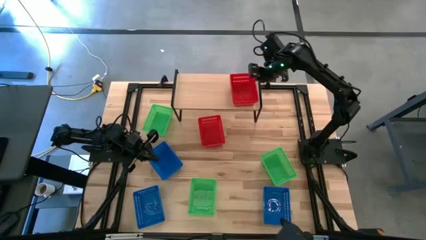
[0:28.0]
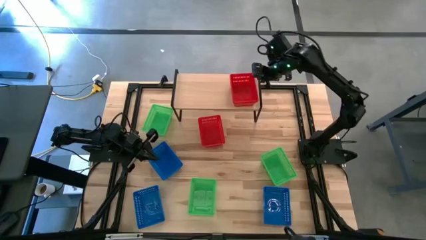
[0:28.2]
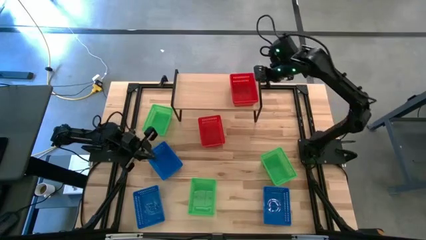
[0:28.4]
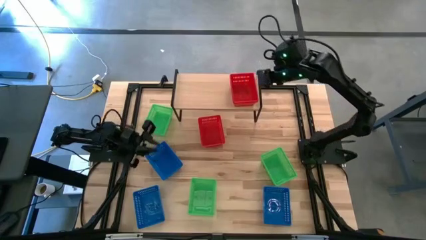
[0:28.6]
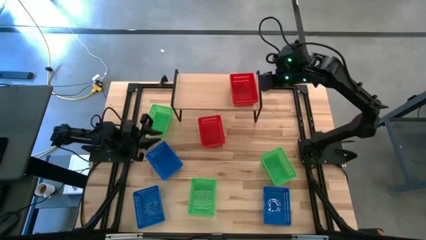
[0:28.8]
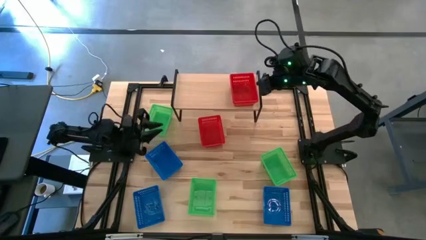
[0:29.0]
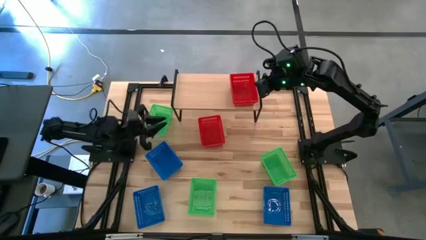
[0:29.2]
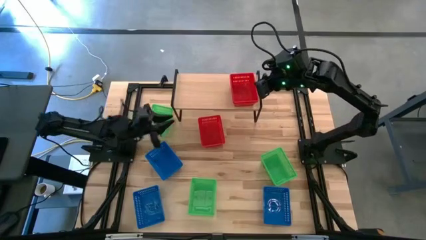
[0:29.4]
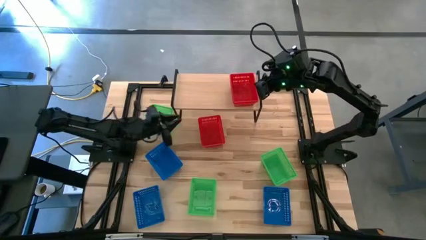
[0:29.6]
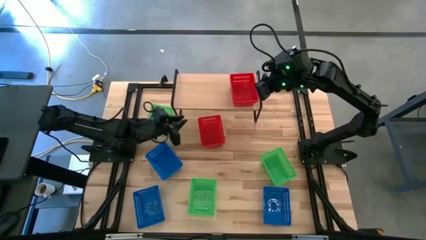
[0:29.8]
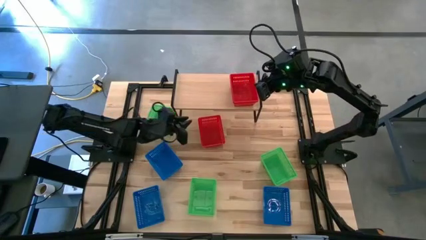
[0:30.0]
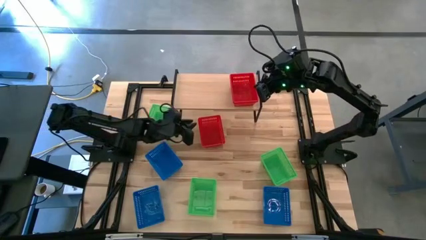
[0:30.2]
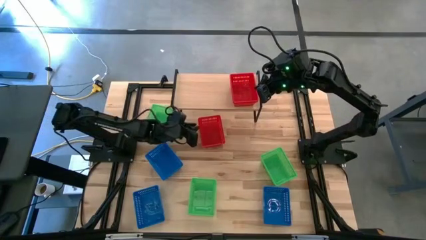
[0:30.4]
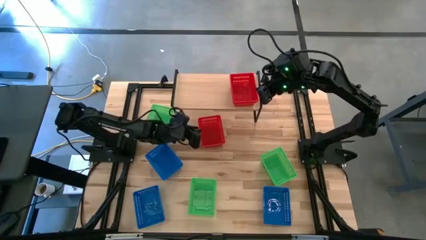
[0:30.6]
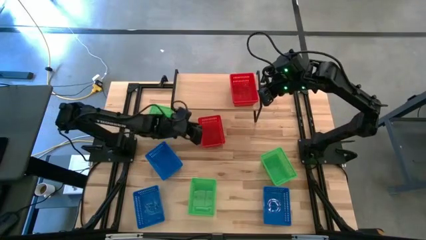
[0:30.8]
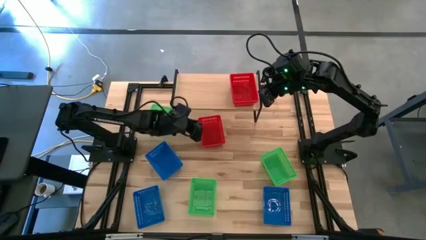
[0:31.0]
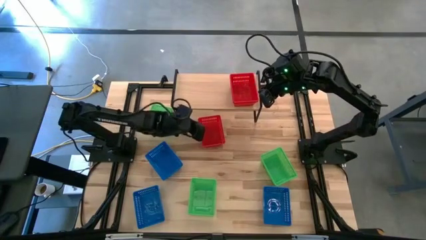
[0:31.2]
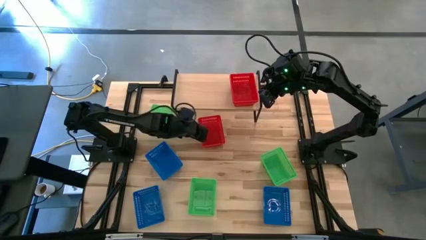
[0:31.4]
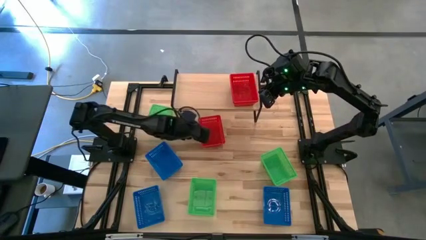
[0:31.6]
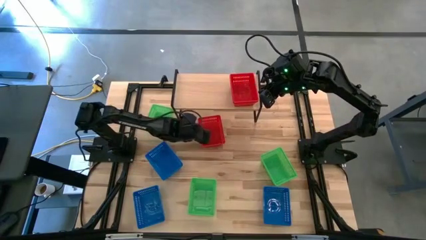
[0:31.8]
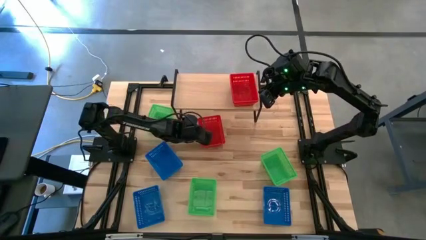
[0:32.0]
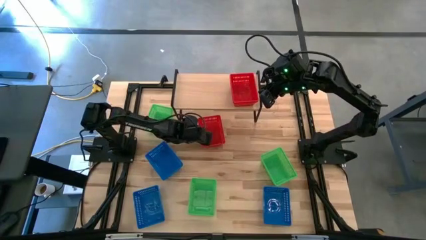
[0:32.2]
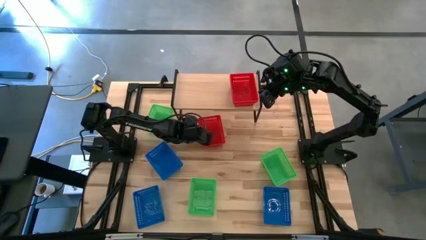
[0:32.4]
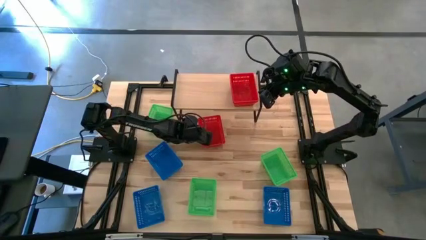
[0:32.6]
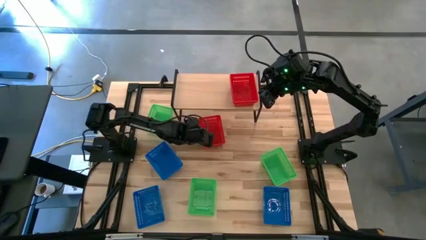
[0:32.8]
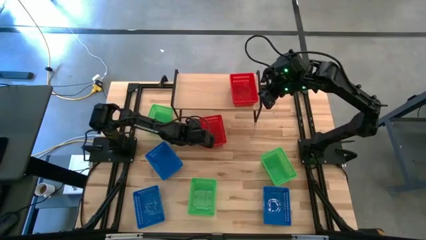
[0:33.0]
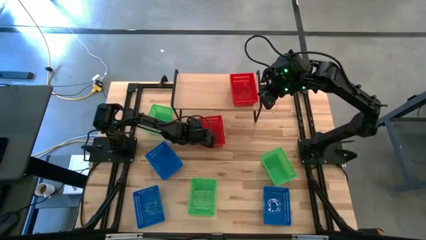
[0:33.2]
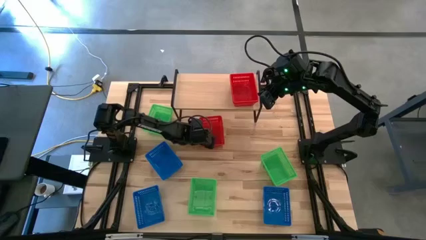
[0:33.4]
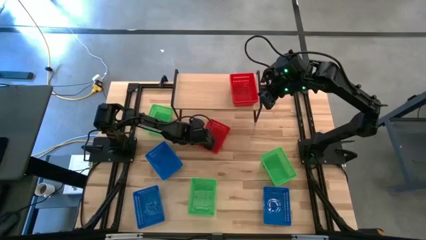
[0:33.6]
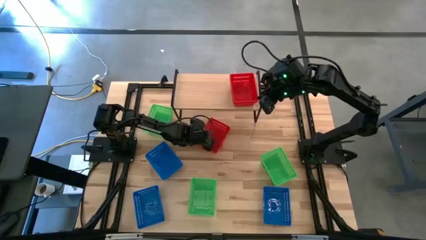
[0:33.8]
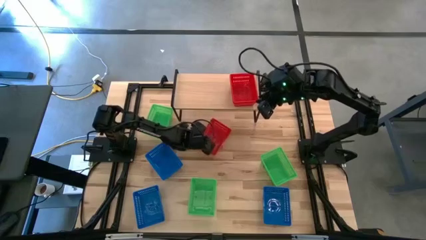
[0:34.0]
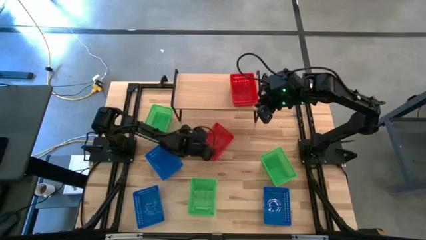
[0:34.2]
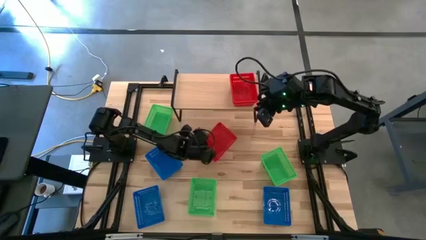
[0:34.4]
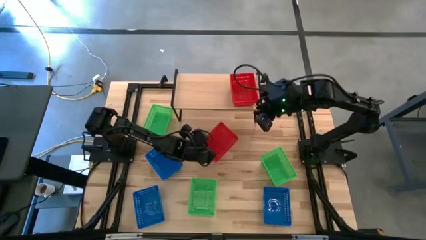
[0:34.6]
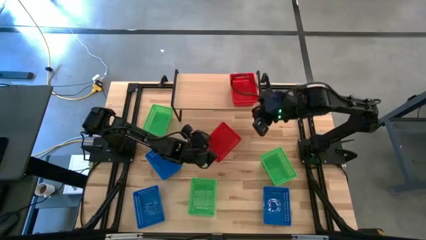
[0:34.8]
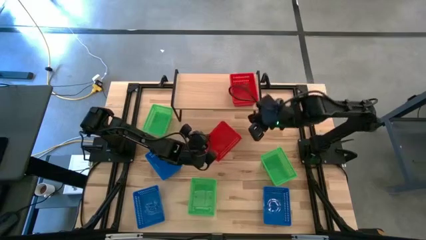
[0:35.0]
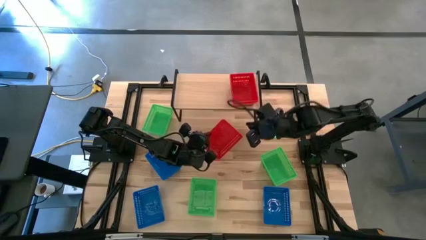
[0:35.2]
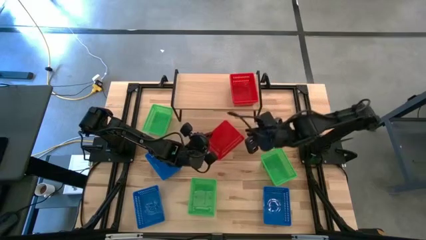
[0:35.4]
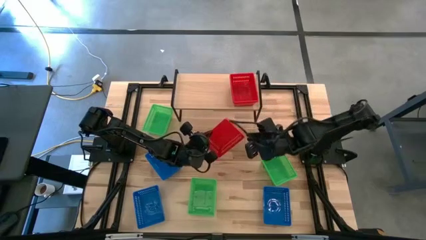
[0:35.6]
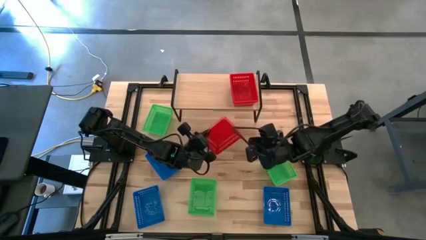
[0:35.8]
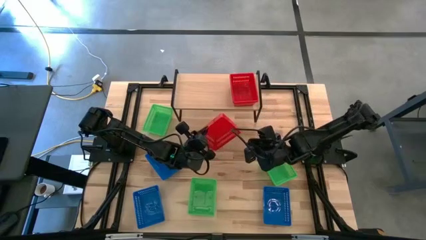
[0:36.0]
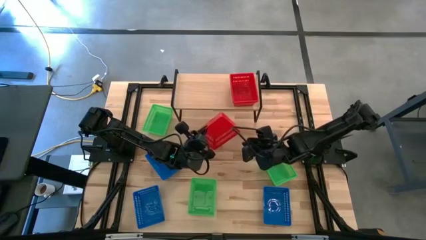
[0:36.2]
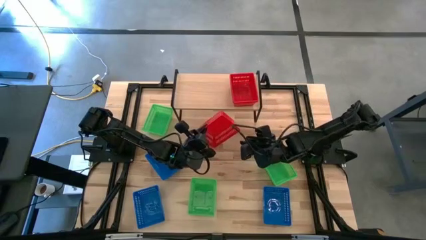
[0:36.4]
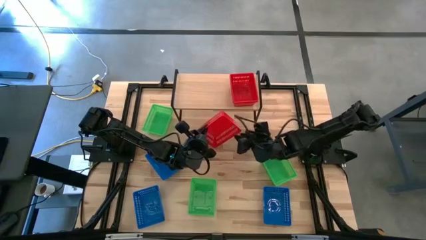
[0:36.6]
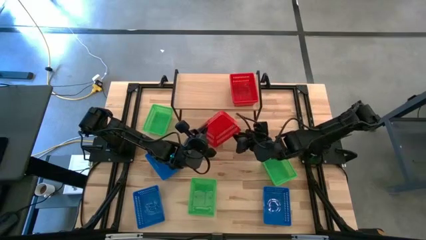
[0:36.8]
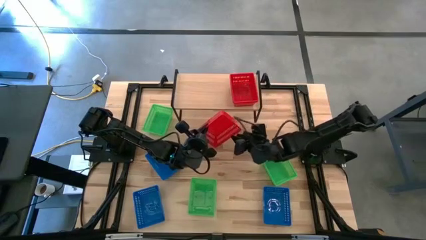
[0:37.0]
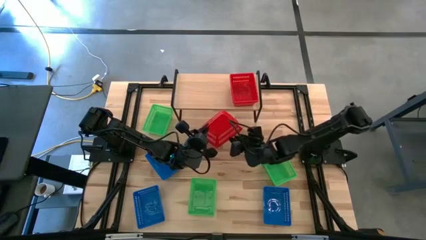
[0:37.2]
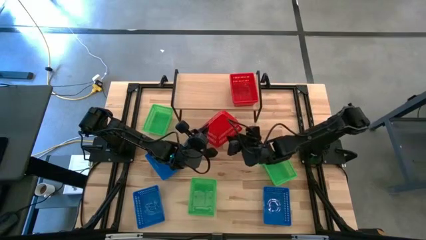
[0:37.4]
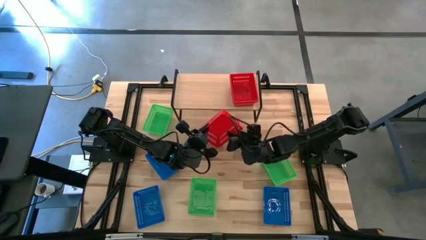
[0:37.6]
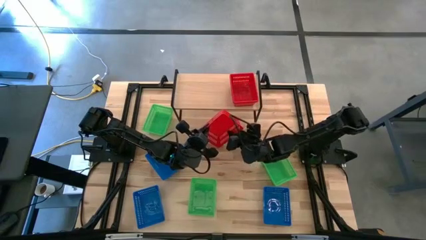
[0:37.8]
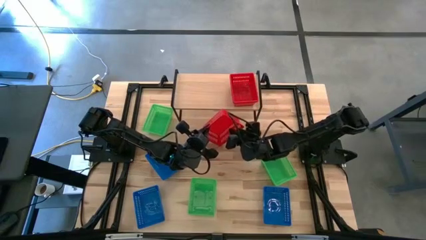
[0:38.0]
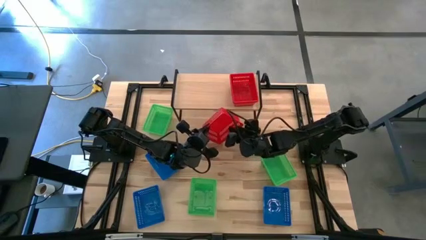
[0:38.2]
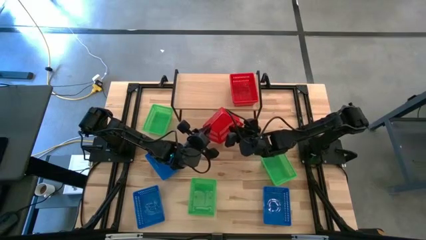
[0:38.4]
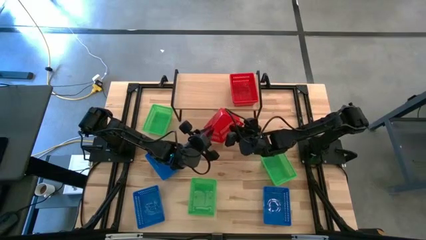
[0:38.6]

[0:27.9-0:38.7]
Task: Stack baskets on shelf by color
Stack the red basket on top of the stacked red baskets on the shelf
